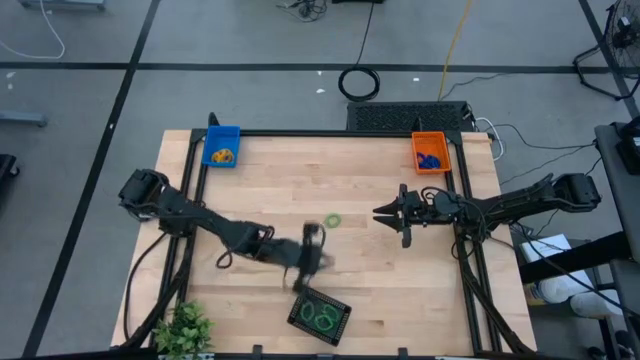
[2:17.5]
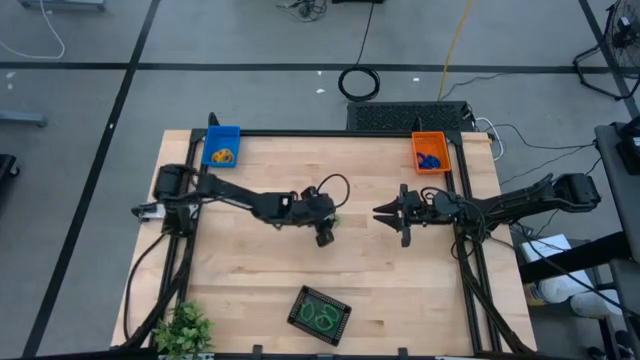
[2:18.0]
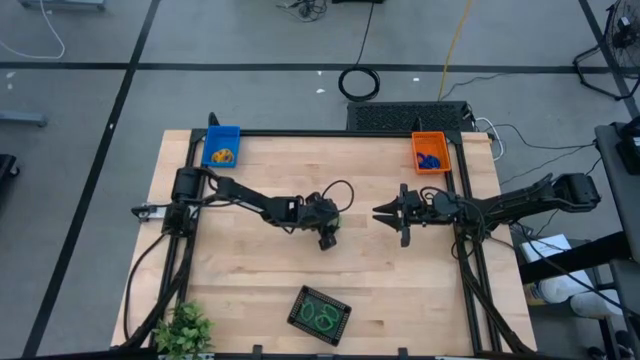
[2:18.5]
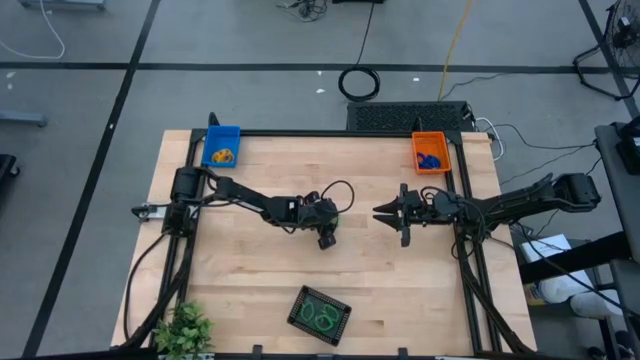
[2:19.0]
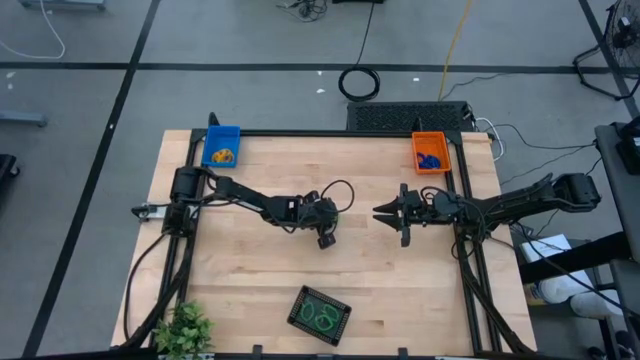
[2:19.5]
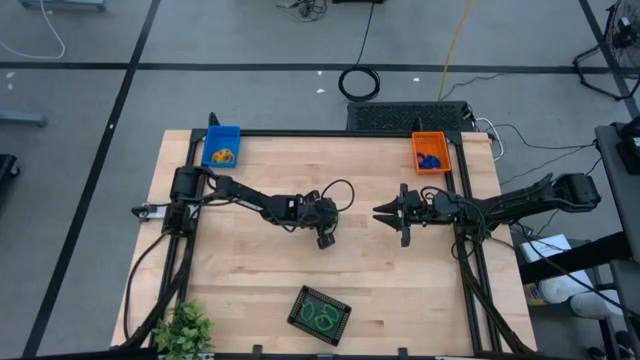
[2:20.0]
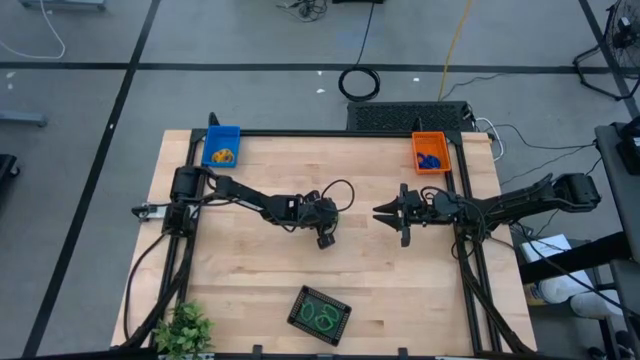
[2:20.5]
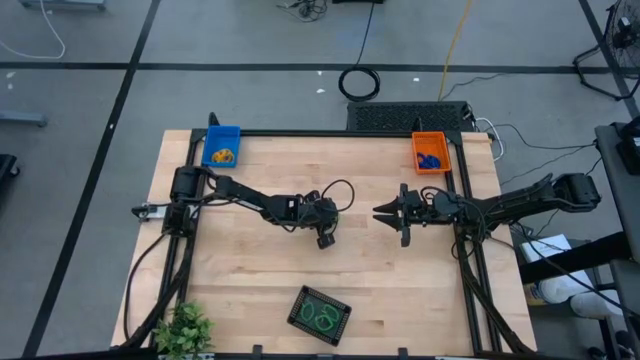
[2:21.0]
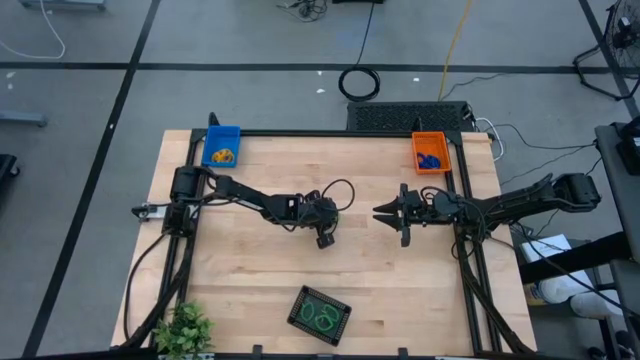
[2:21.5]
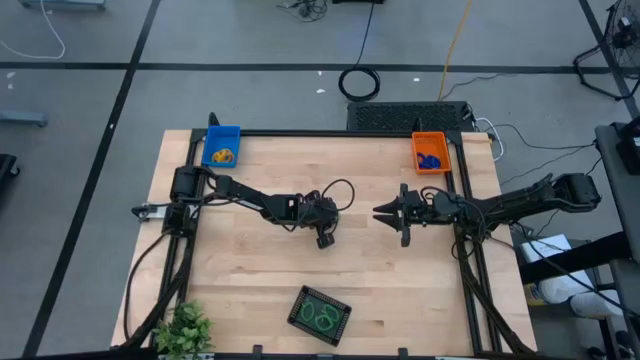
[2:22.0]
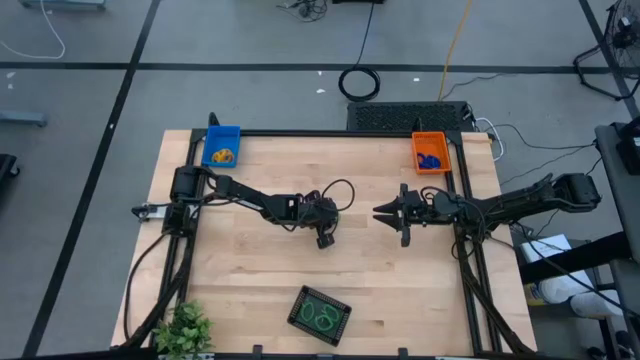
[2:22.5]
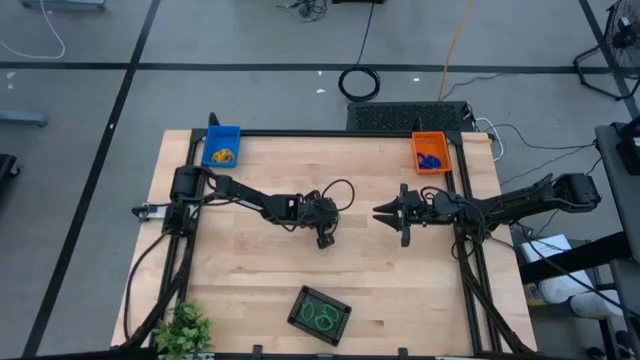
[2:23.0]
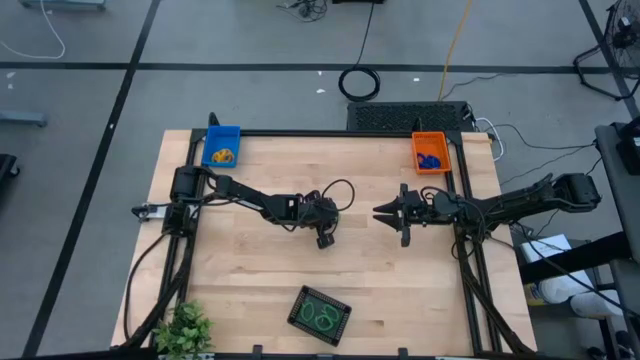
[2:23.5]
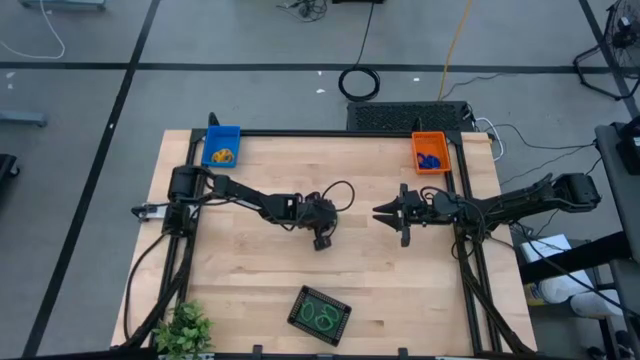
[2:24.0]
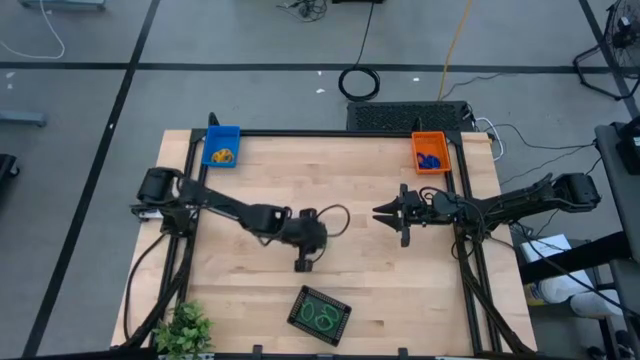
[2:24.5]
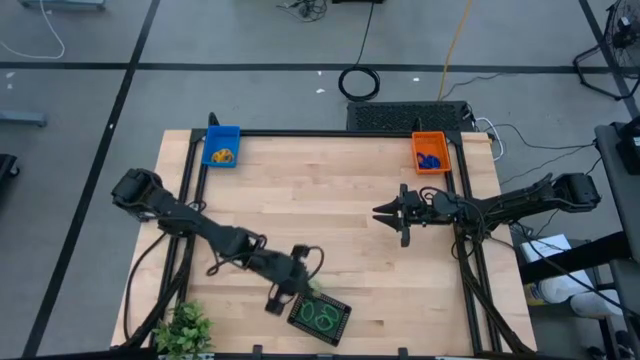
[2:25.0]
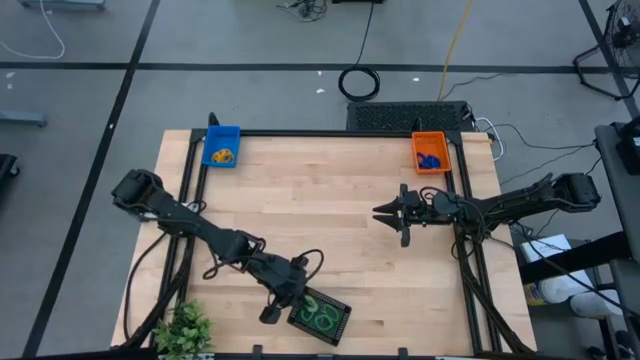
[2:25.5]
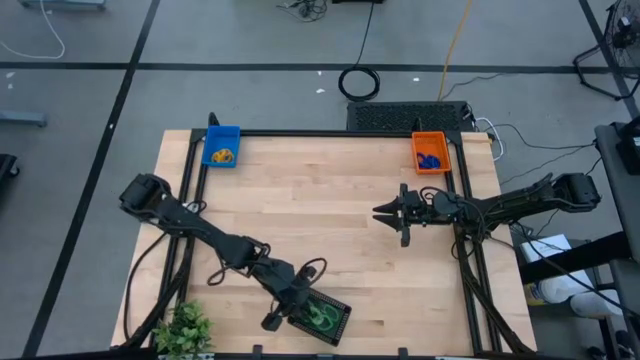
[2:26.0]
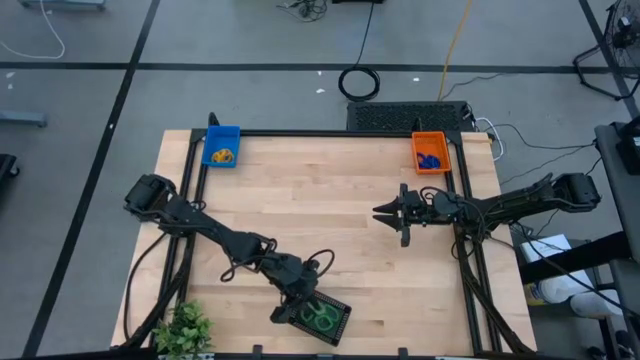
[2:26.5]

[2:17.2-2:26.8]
Task: Sort spring keychains into baskets
Put the green spring keychain into the black basket

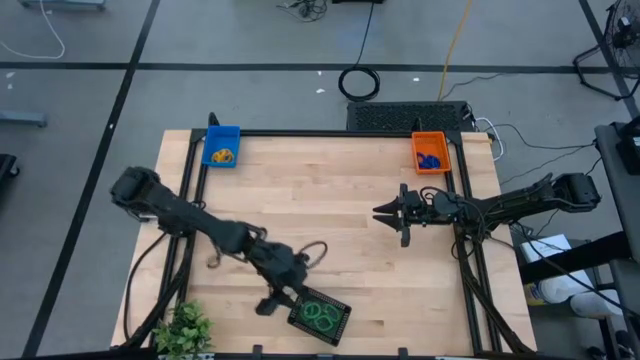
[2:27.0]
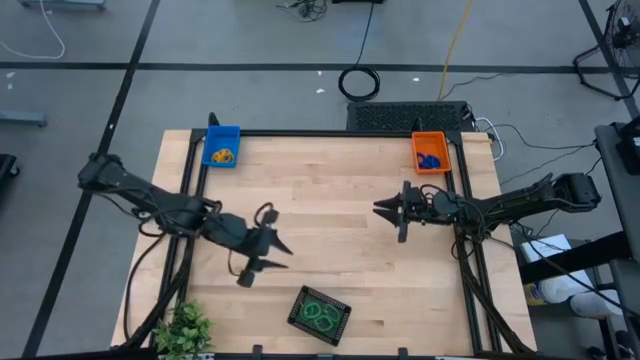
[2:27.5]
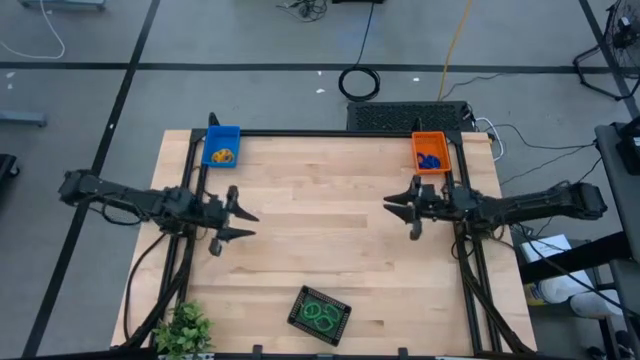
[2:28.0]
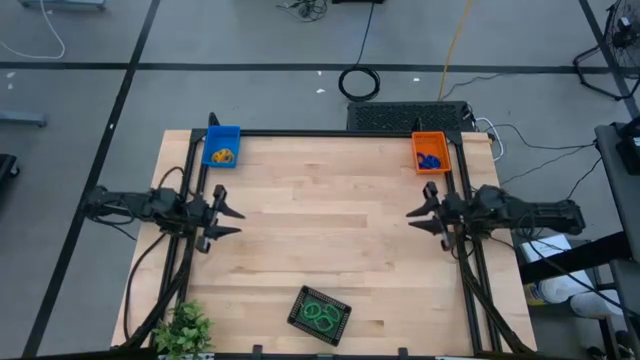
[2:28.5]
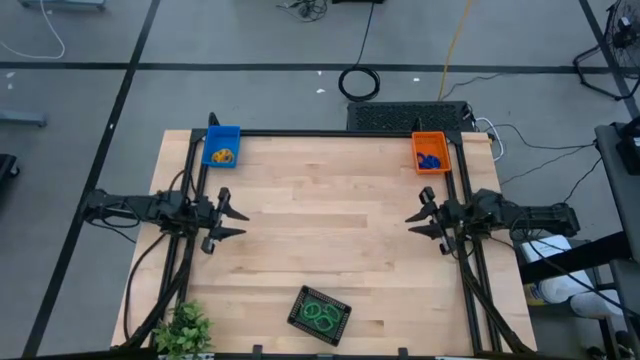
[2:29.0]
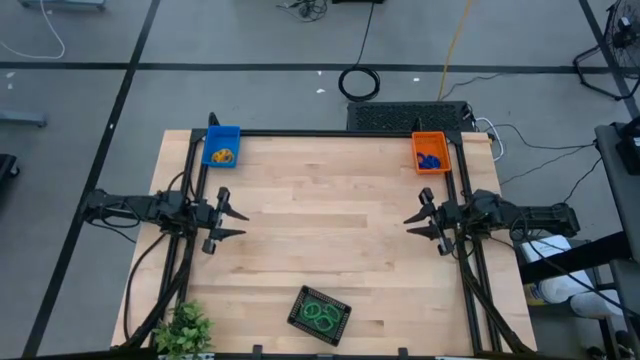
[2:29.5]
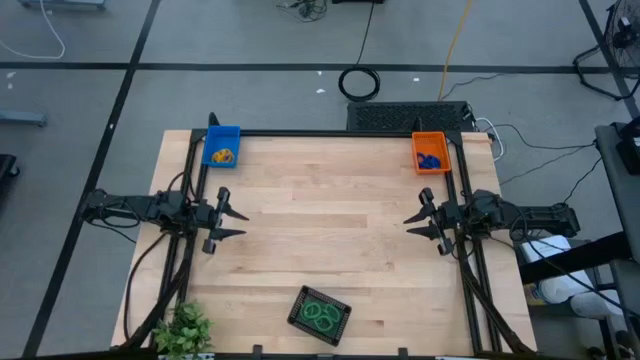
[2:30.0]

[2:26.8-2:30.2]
Return to Home Position

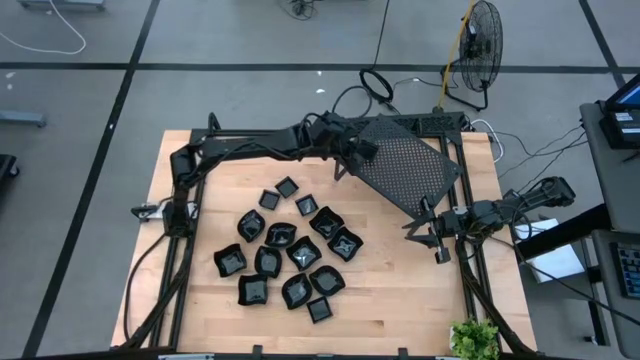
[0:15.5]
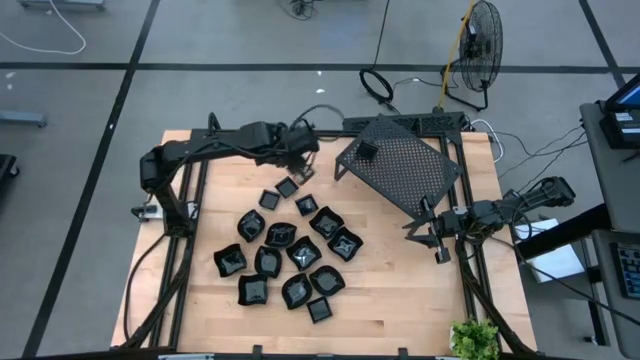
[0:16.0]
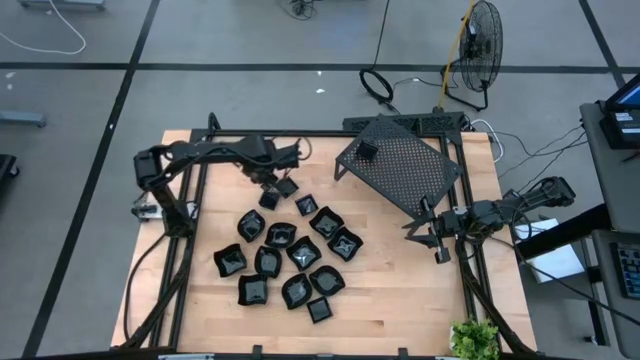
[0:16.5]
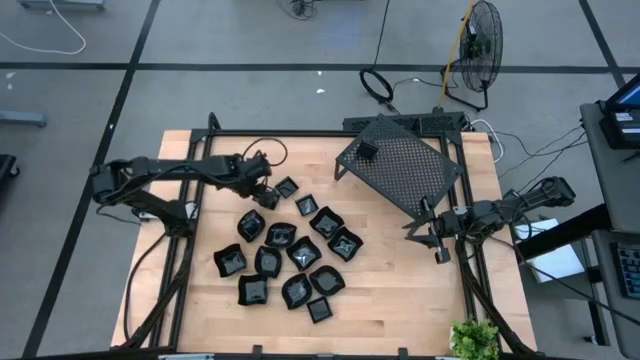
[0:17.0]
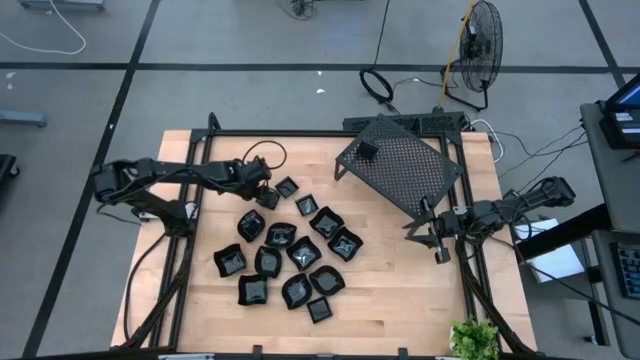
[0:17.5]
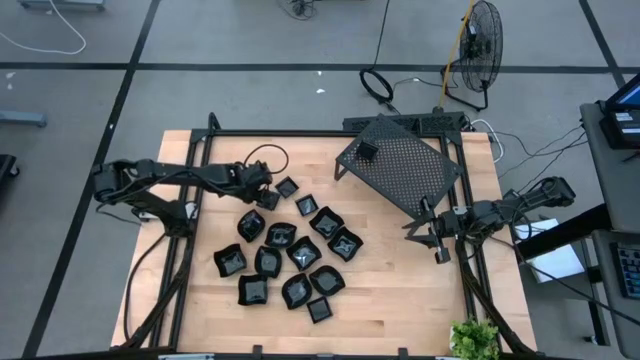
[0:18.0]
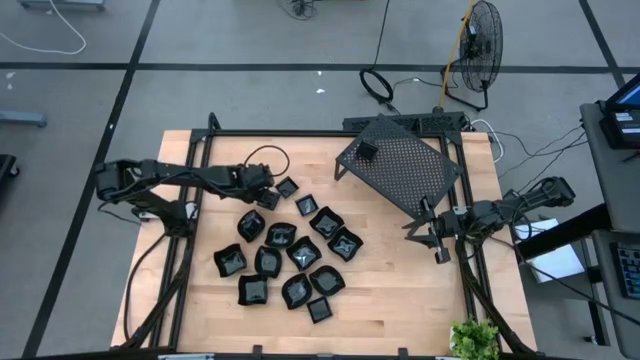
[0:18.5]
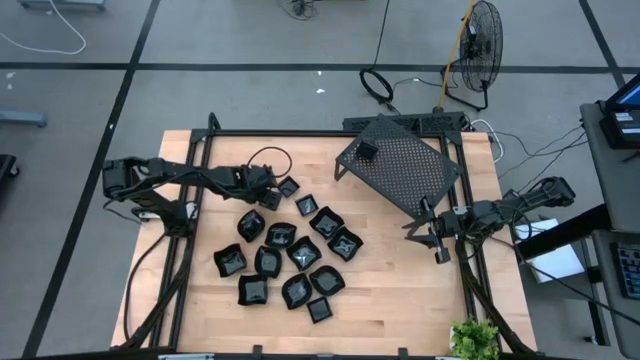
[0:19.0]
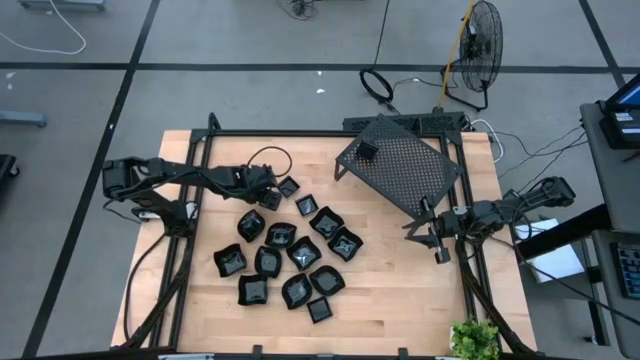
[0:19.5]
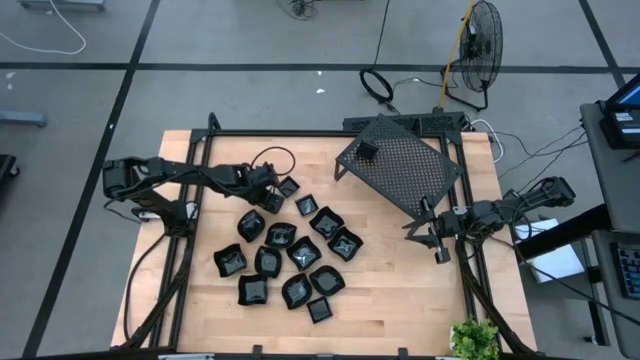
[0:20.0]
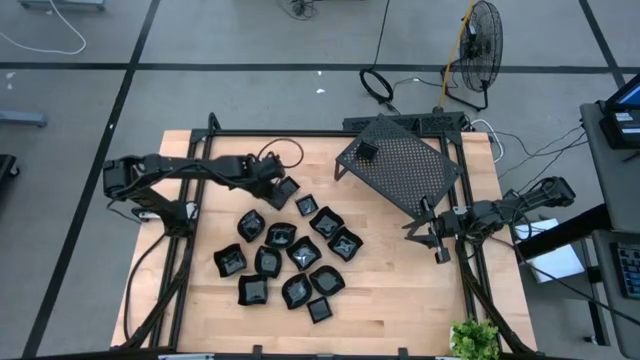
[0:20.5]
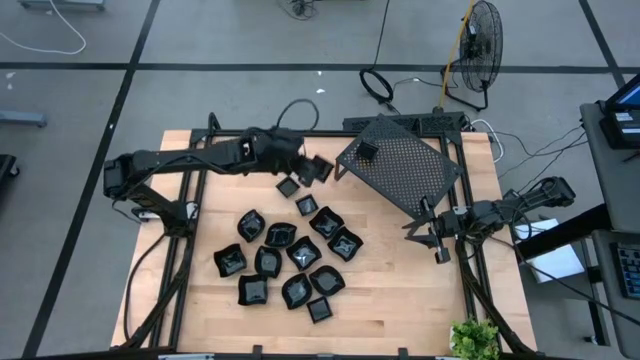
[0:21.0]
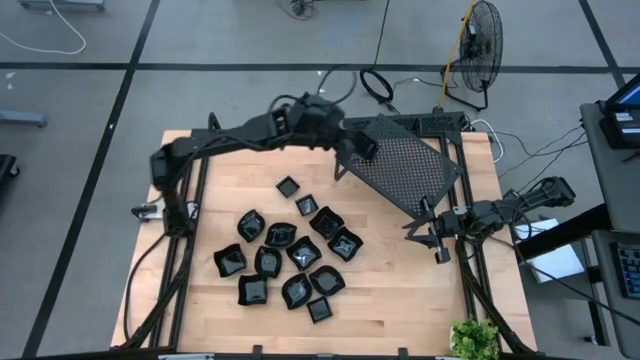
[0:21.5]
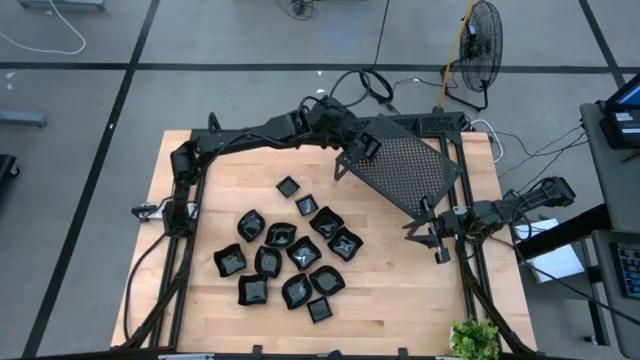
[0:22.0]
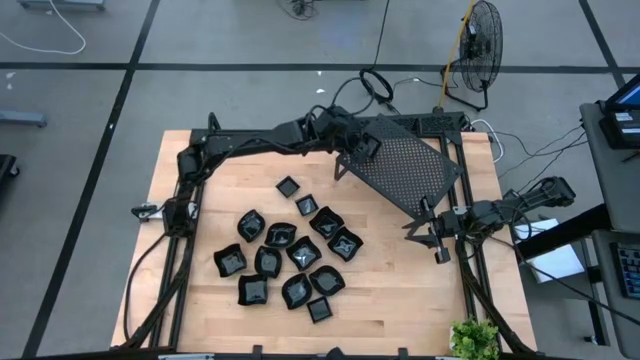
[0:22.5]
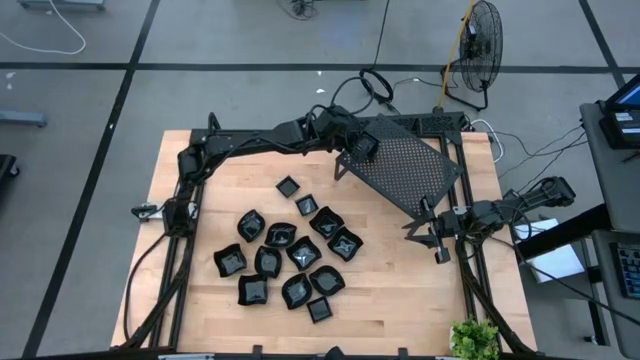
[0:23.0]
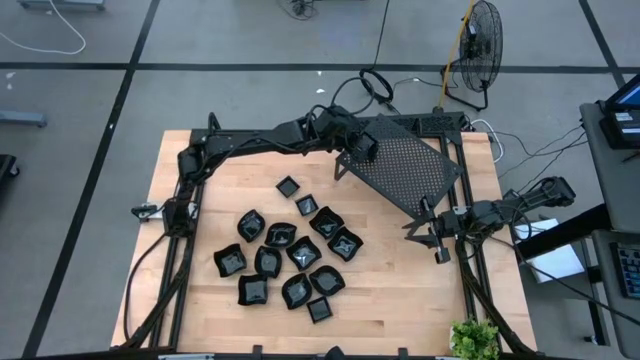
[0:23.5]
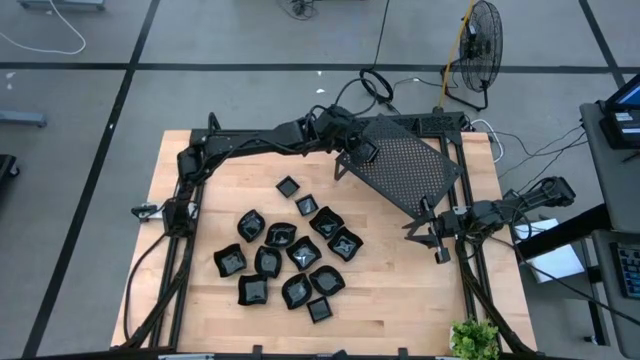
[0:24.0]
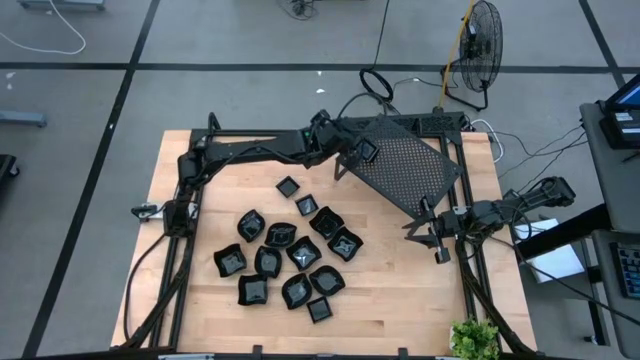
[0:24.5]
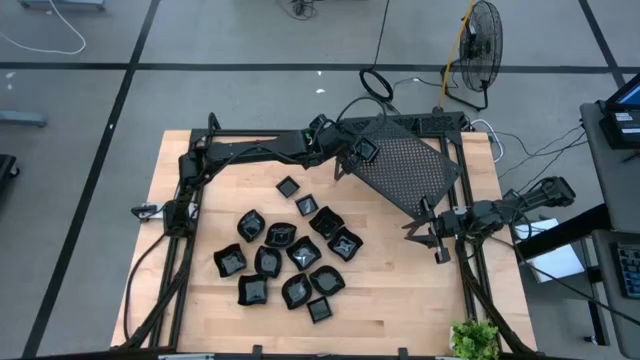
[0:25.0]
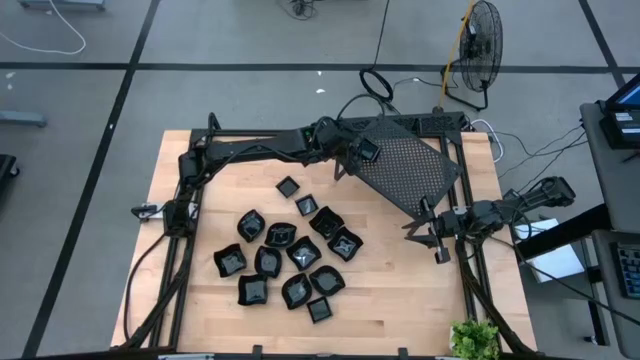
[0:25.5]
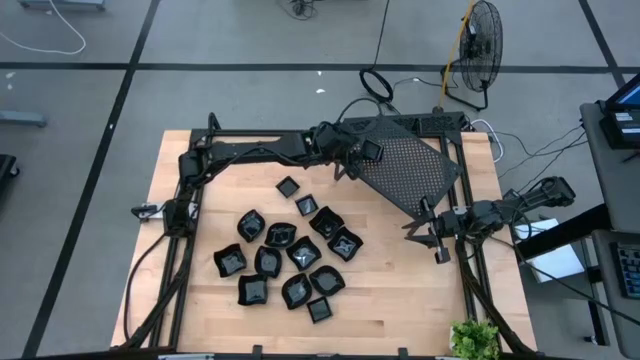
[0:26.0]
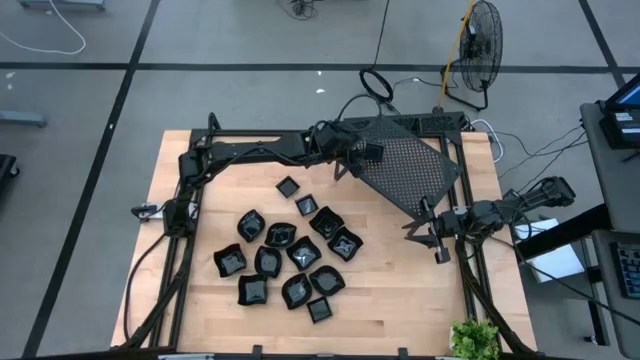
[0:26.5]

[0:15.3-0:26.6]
Task: Pick & Place Mini shaped plates
Stack the black square plate on the square black plate on the shelf
